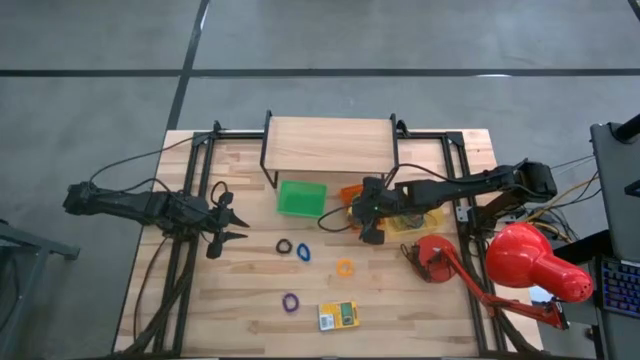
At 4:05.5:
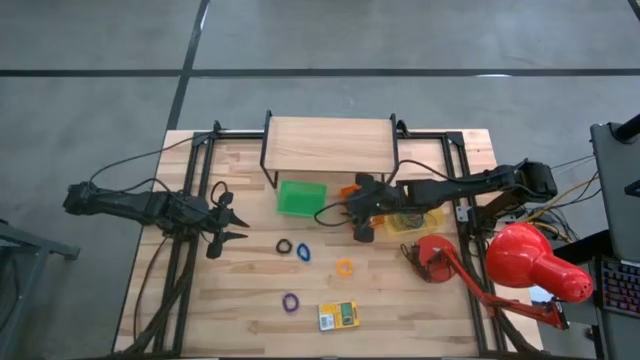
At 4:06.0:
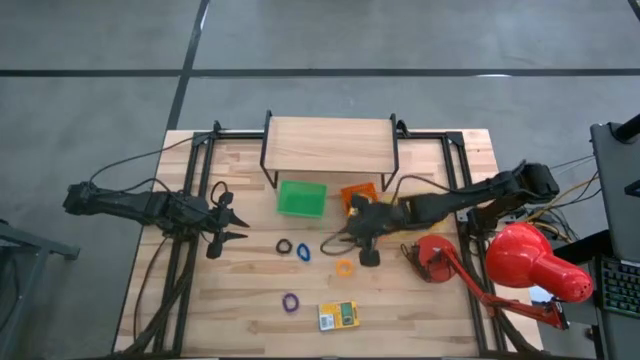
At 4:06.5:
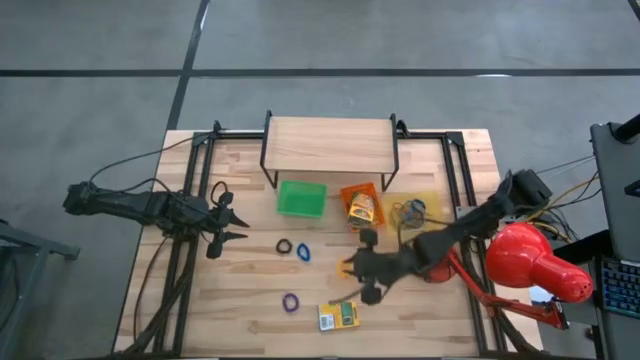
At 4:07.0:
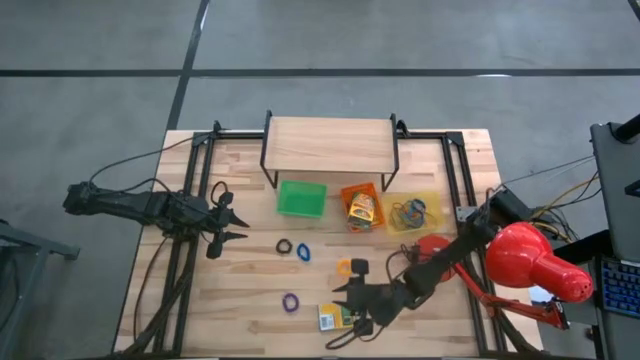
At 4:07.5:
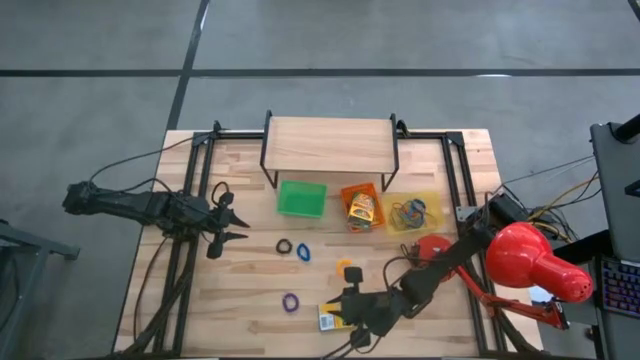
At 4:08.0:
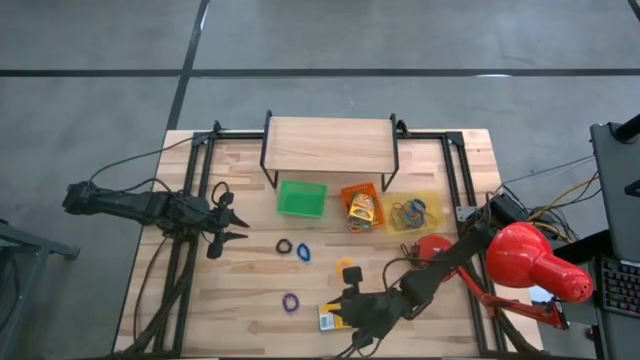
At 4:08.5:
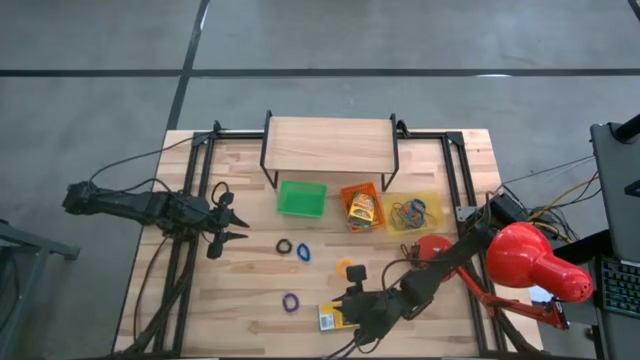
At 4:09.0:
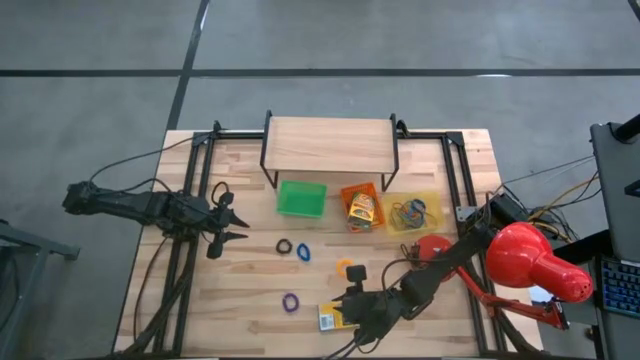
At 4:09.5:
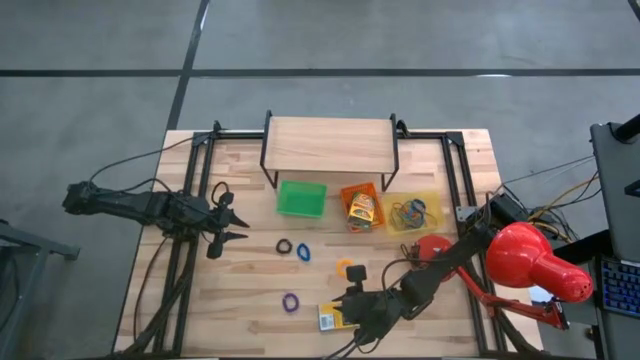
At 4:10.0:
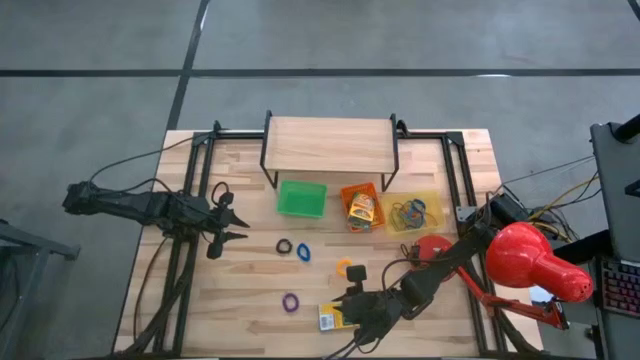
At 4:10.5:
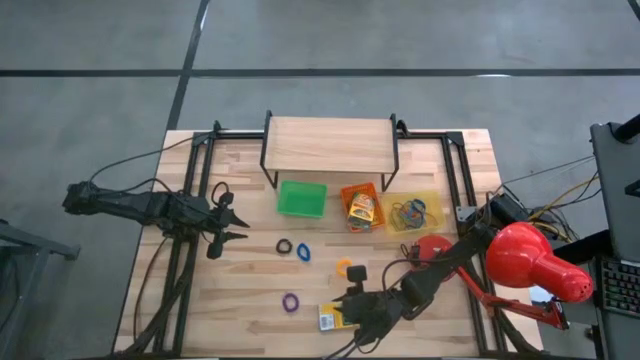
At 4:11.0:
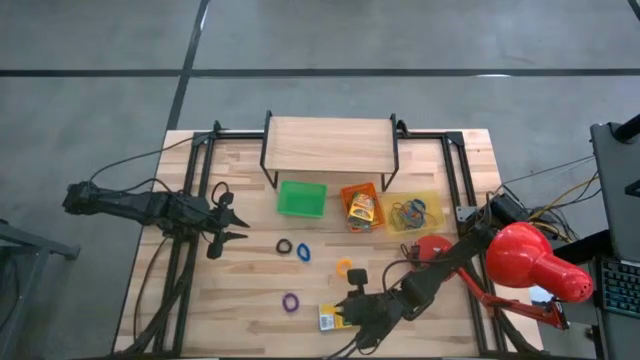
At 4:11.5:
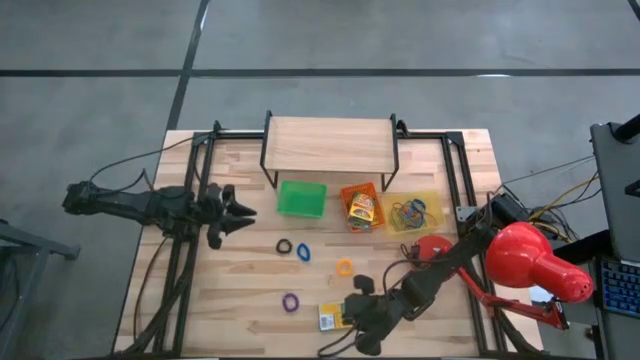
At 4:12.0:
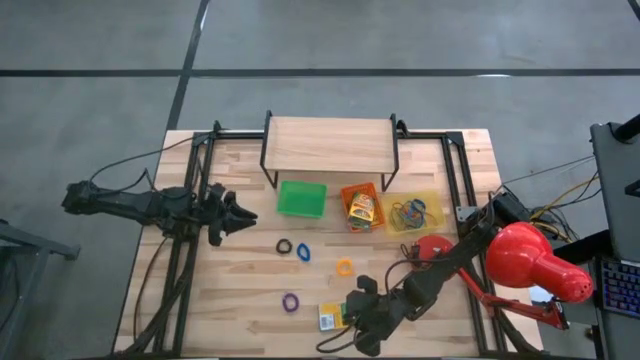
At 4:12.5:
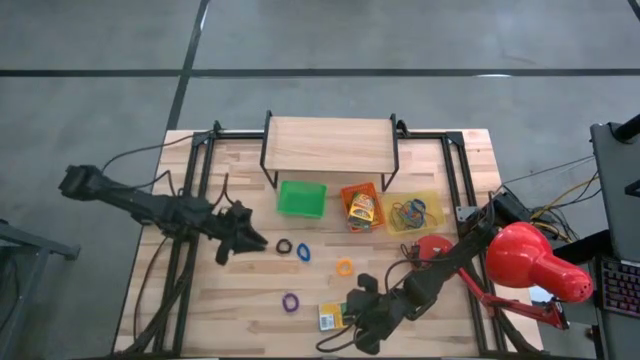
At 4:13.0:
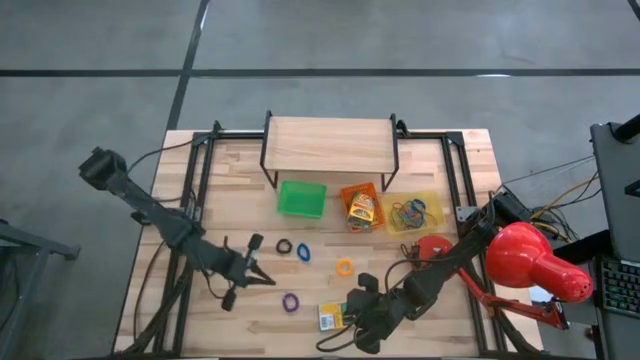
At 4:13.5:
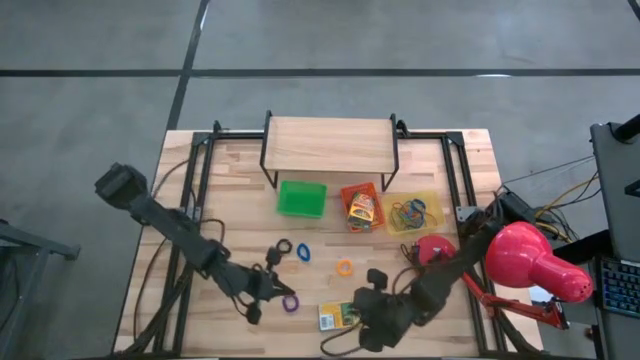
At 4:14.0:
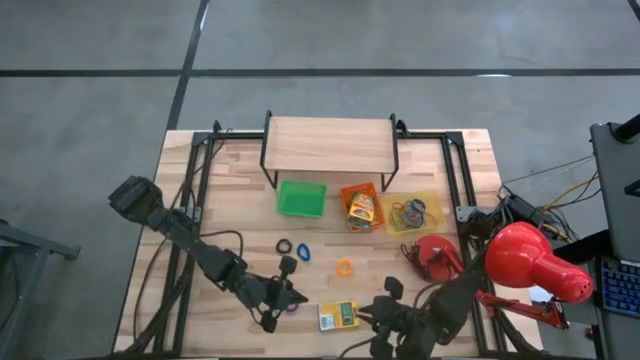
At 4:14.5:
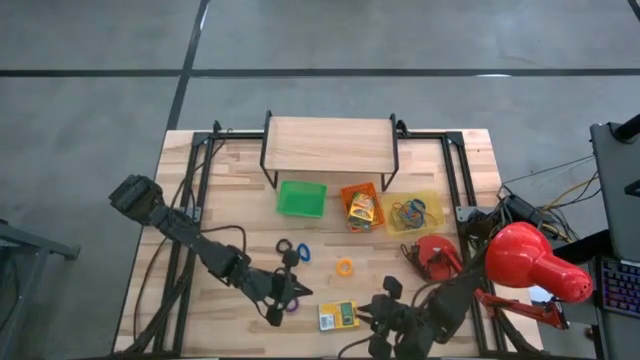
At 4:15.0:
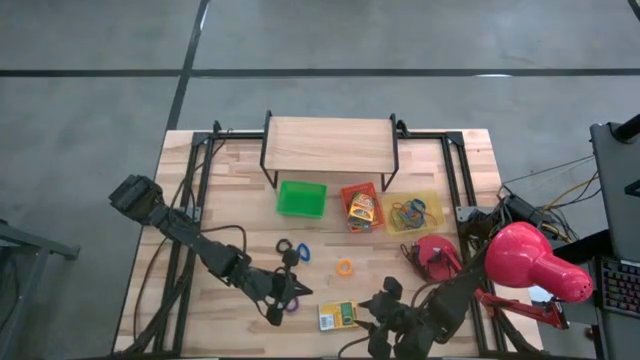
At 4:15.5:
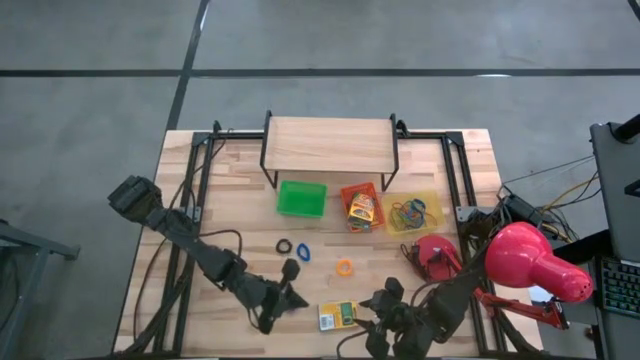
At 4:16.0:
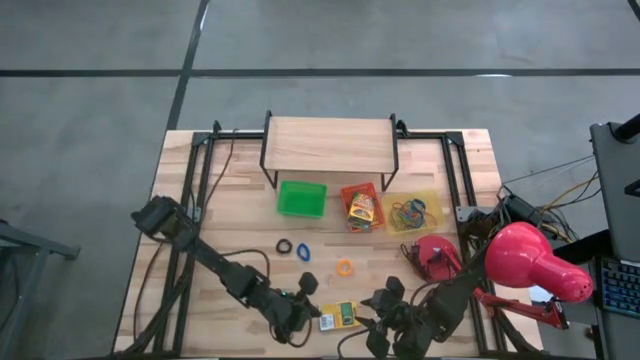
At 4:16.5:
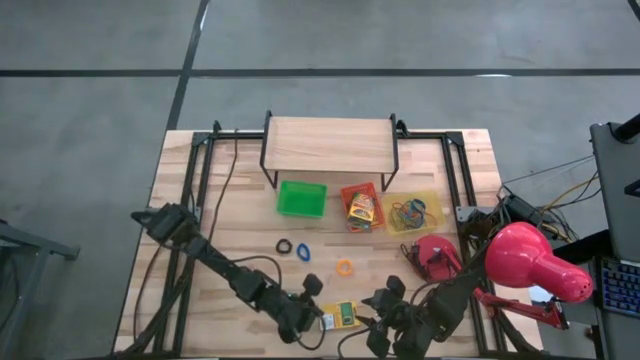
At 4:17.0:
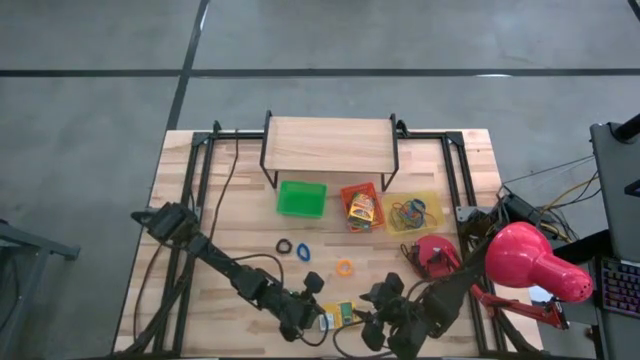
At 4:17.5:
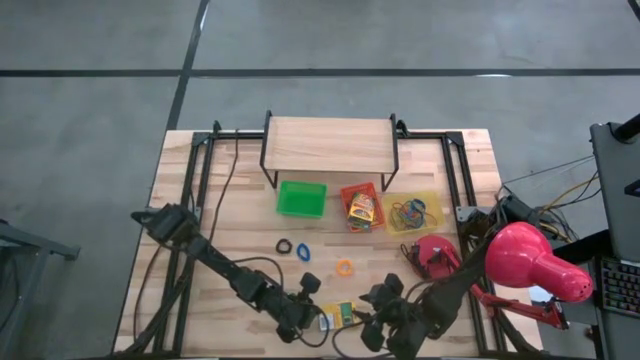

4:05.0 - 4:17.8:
Task: Pick & Place Office Desk Supplies
Put the large crayon box into the orange bin

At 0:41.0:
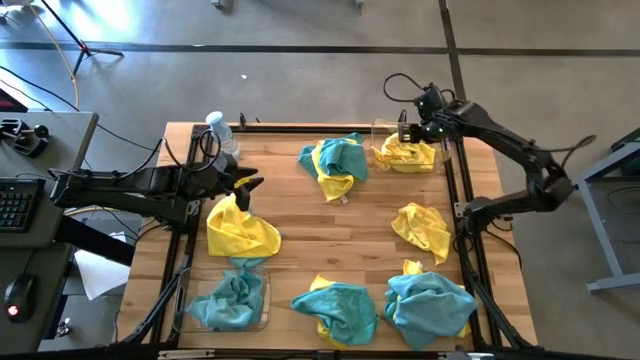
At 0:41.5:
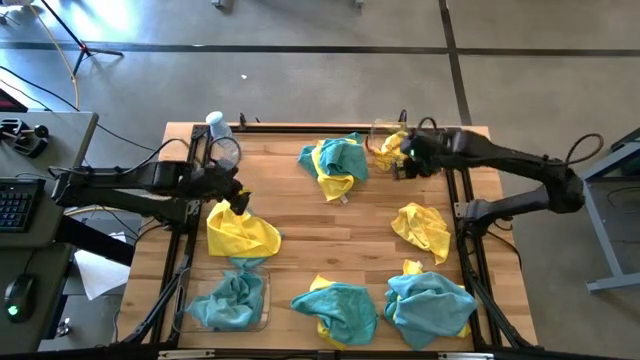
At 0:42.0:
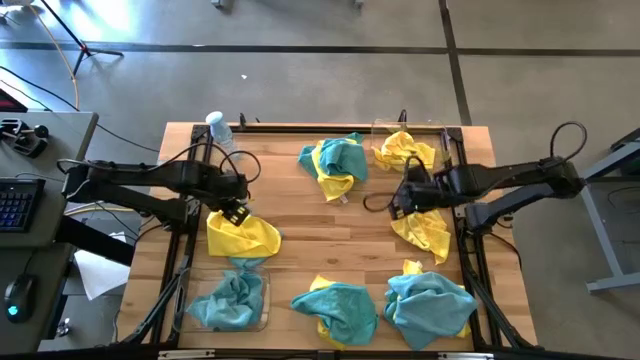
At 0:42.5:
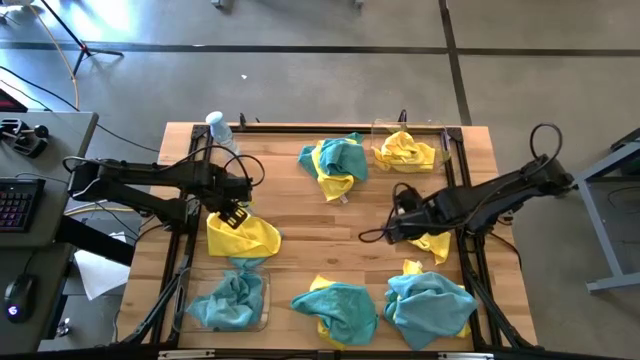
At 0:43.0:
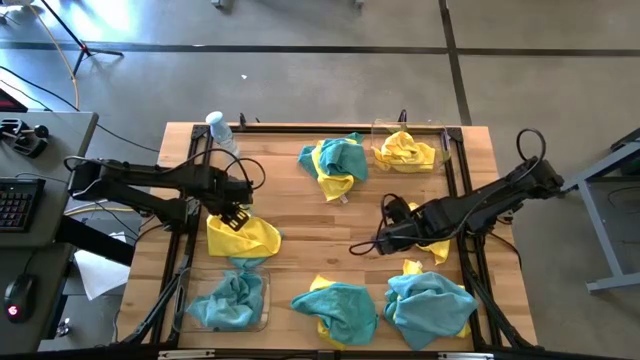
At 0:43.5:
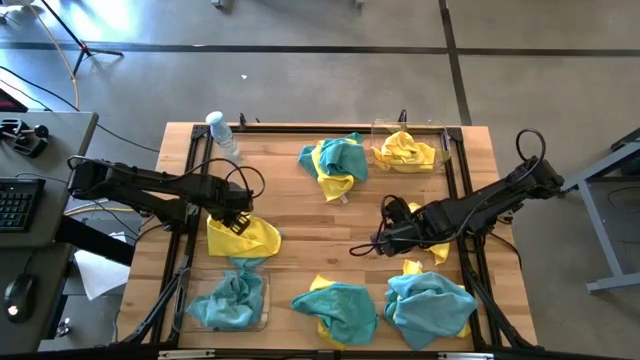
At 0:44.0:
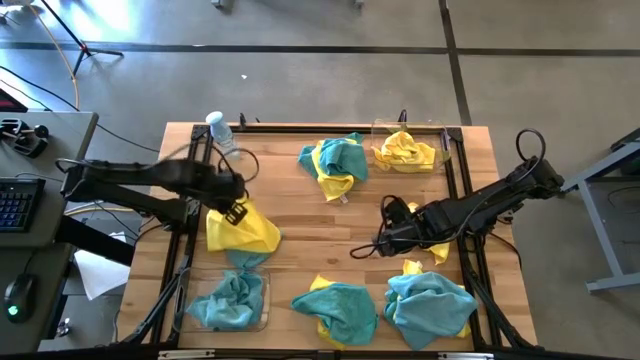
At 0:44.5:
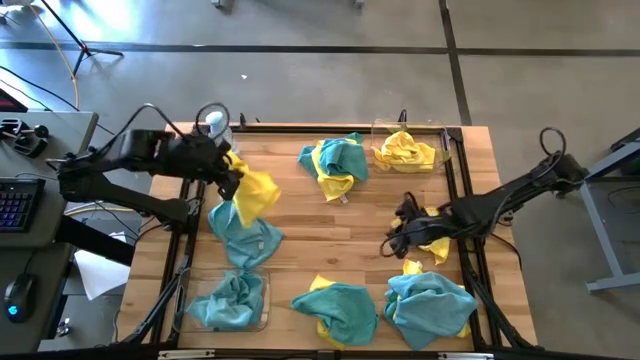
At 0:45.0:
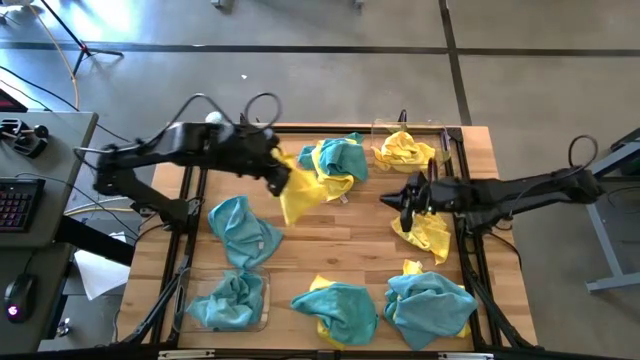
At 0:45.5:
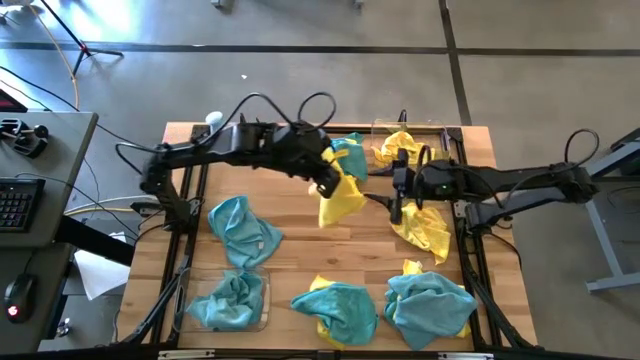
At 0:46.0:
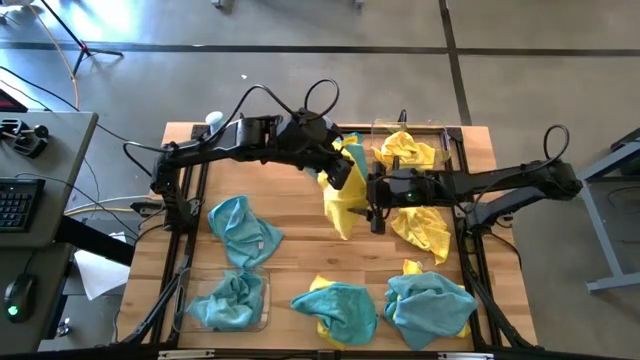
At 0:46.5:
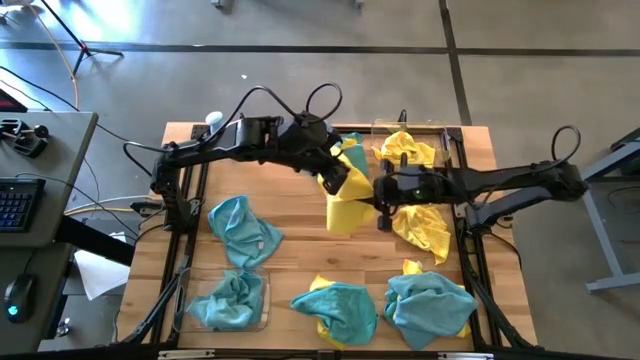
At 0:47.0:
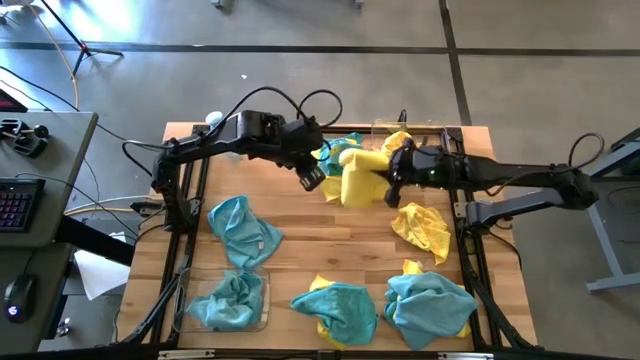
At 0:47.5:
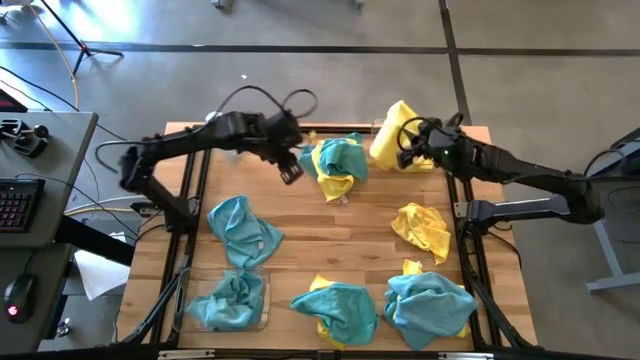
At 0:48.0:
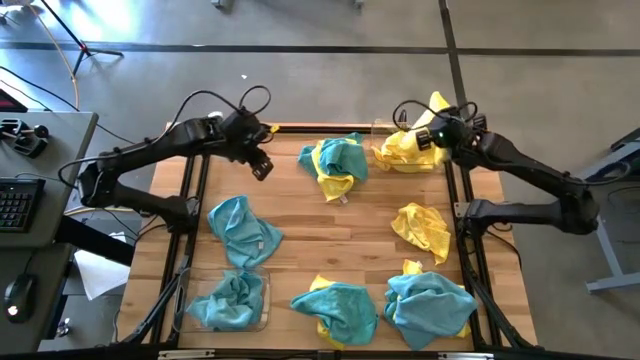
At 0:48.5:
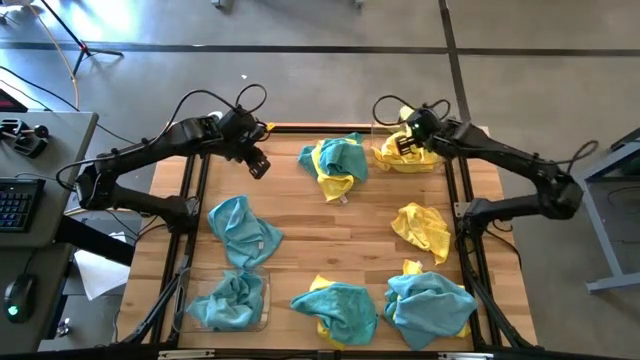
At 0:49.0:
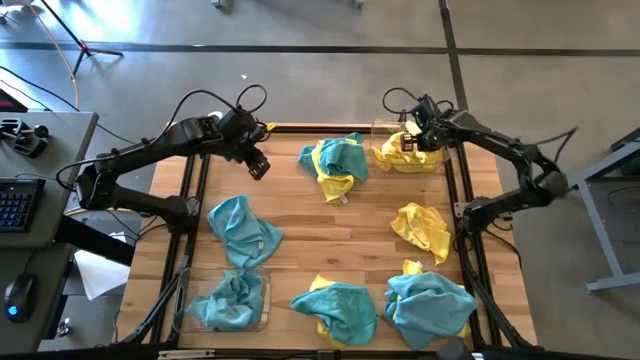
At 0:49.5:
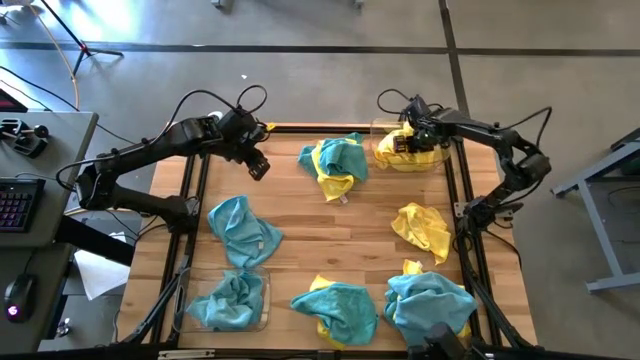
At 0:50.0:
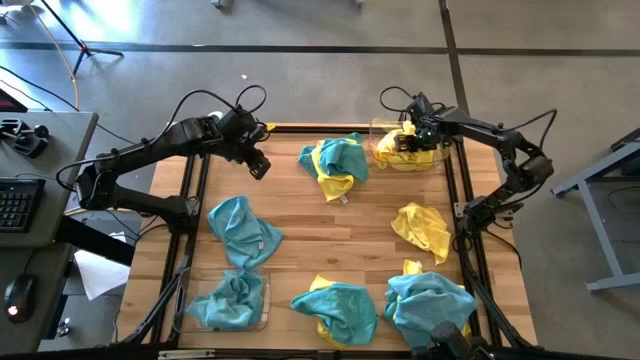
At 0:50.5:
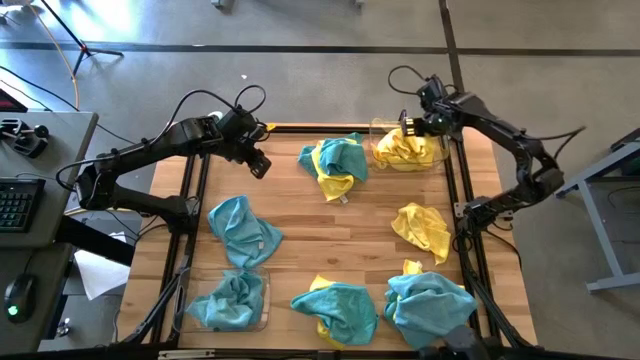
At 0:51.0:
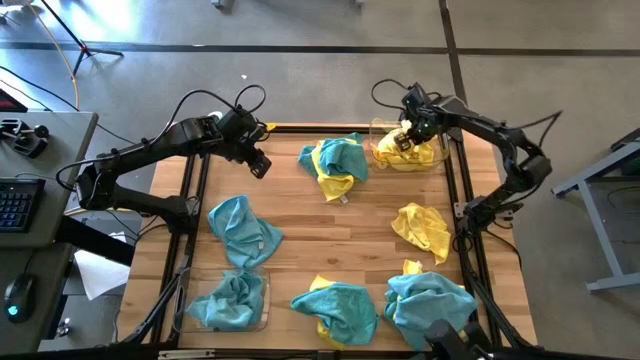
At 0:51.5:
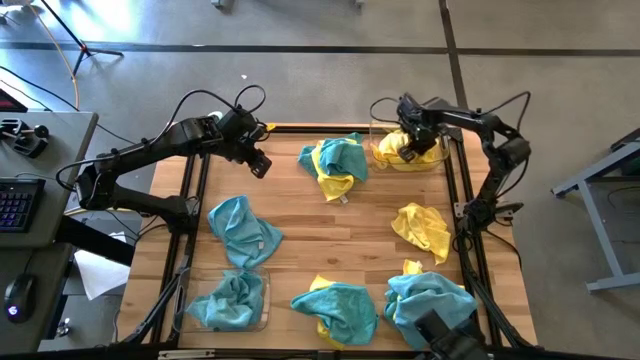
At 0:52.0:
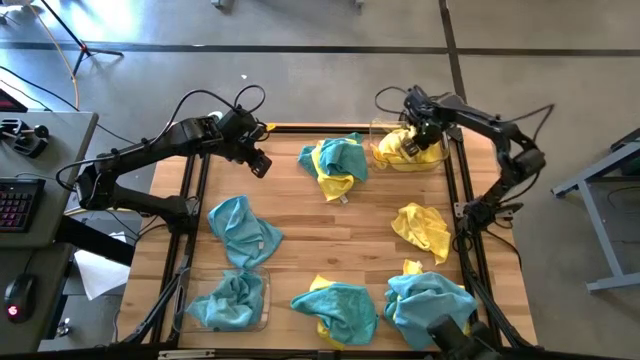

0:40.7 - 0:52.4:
Task: Sort microfiber towel by color & place in baskets
Put the yellow microfiber towel into the top transparent bin
